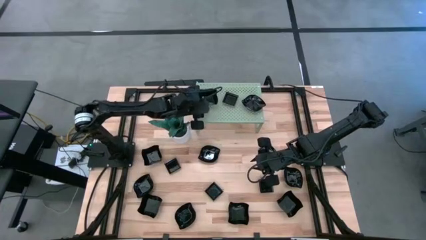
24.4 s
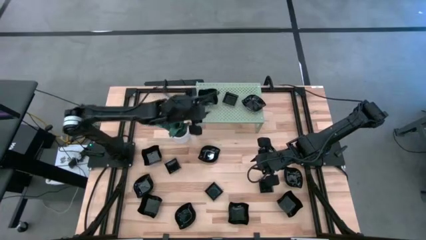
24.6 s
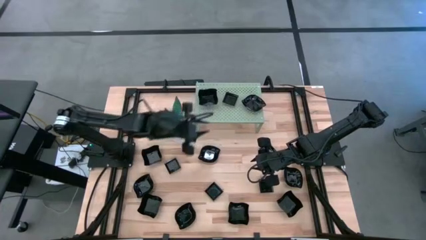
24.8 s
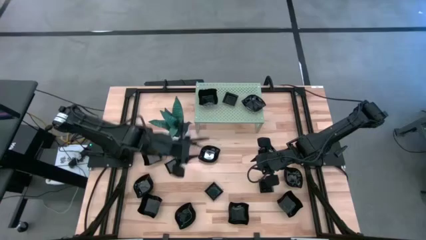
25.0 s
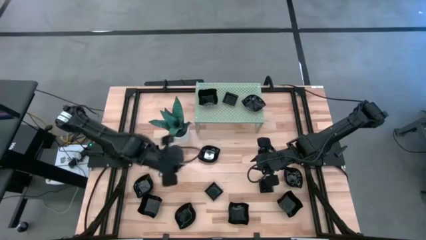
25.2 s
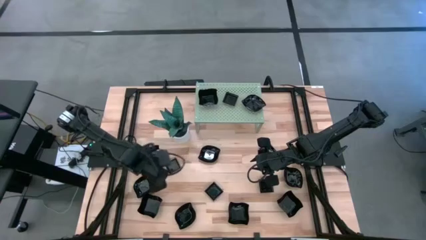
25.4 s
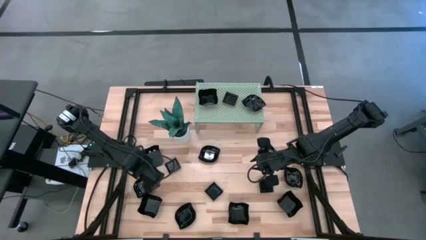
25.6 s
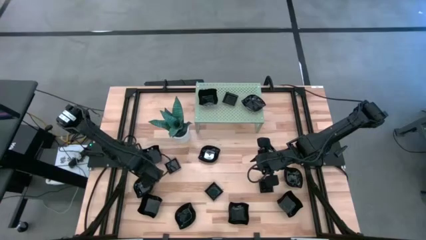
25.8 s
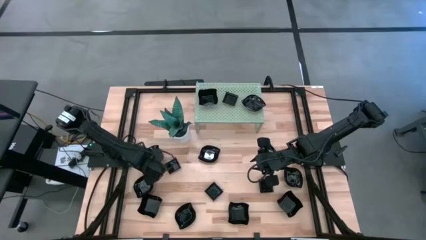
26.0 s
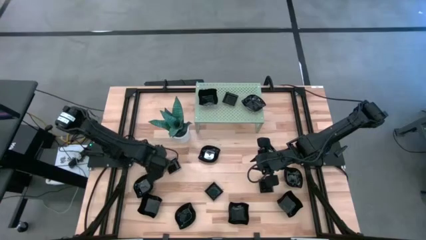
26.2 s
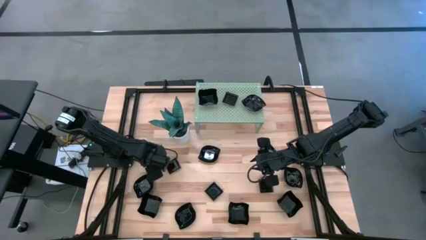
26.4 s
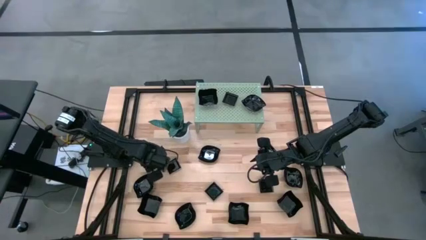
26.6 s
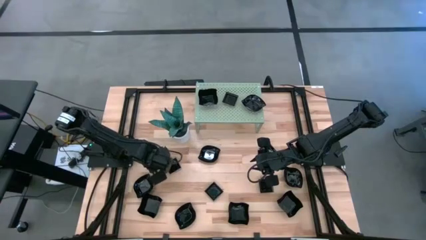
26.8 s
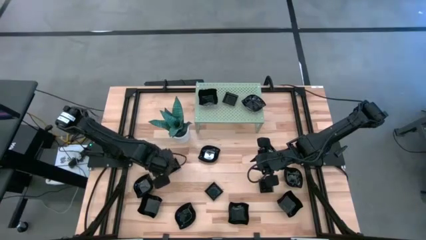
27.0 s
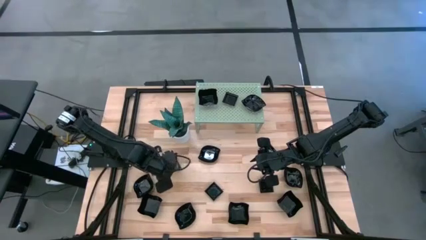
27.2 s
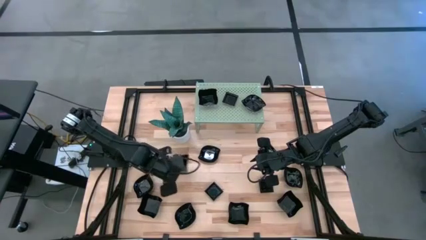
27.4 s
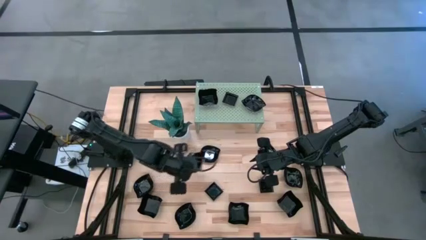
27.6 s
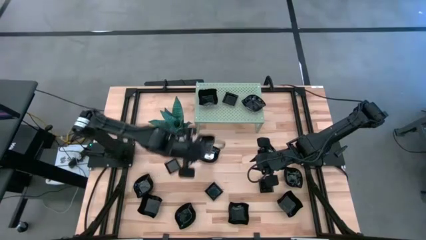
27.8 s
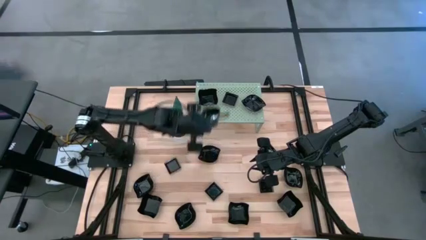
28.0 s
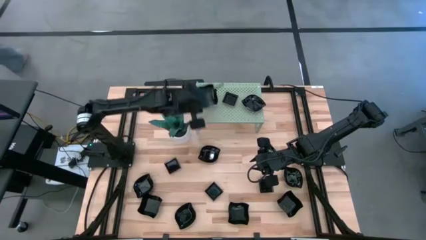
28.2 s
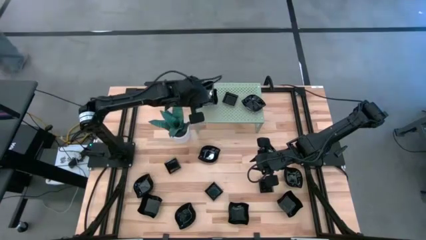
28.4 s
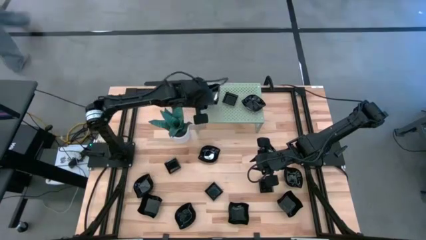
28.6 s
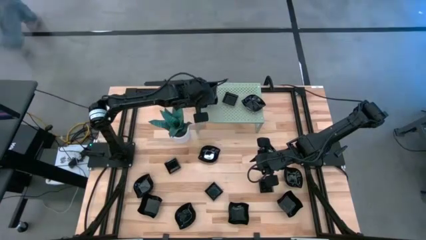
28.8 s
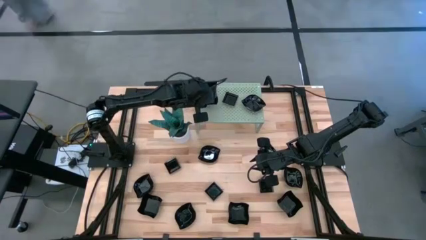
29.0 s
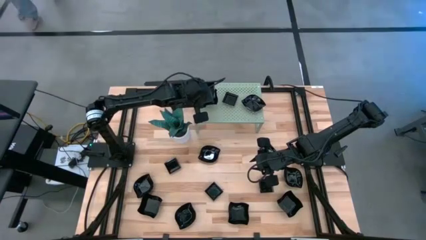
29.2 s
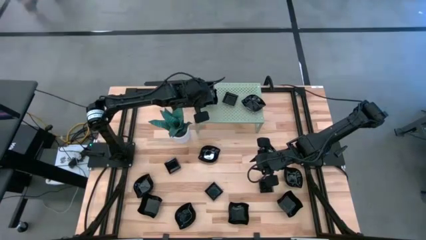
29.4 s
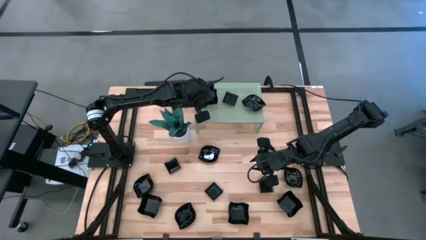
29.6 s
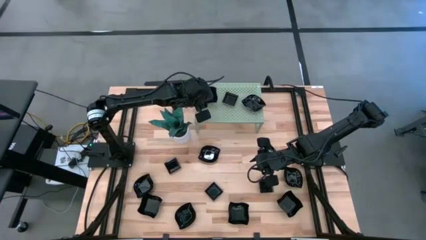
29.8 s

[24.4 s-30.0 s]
Task: Pick & Place Mini shaped plates
Stack the distorted square plate on top of the other distorted square plate on the shelf

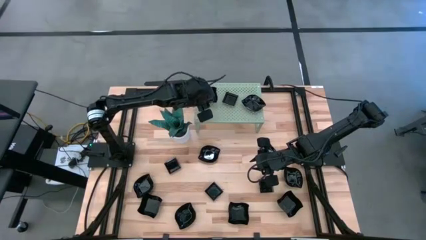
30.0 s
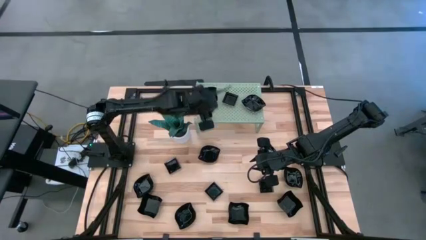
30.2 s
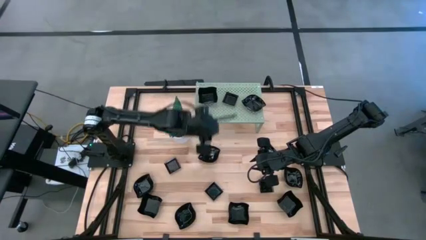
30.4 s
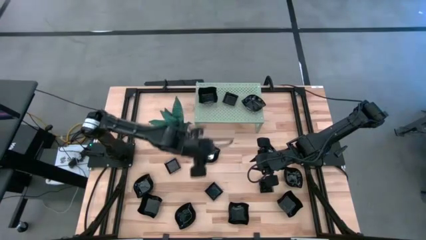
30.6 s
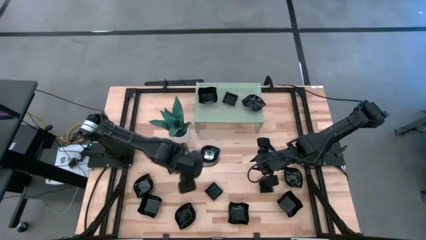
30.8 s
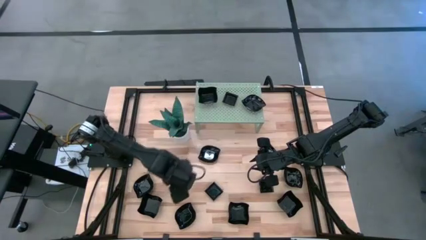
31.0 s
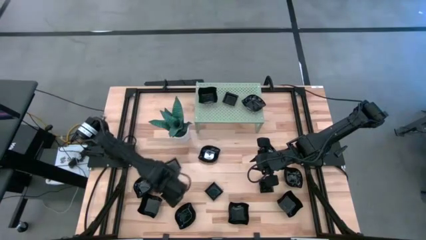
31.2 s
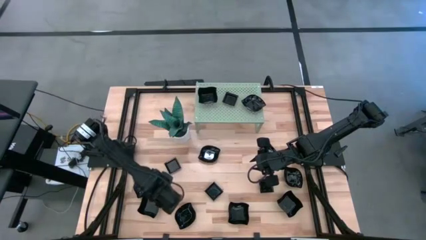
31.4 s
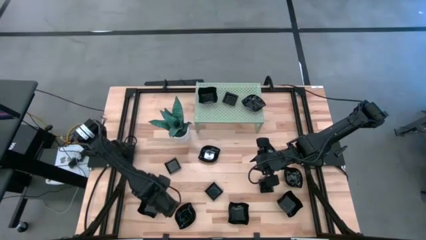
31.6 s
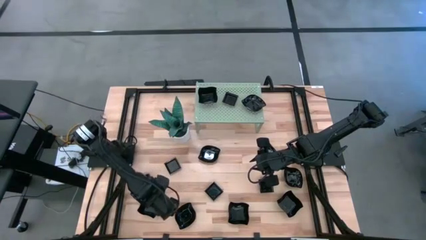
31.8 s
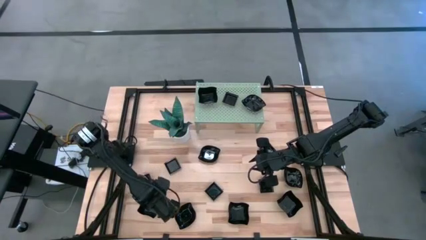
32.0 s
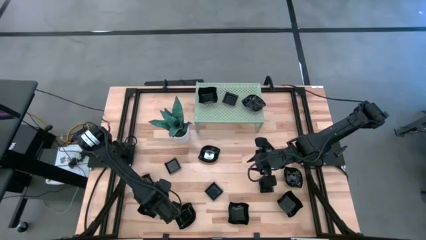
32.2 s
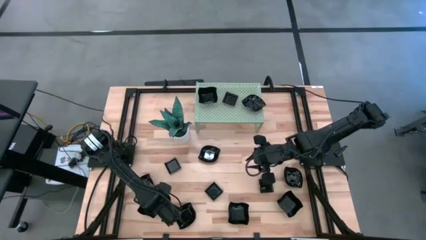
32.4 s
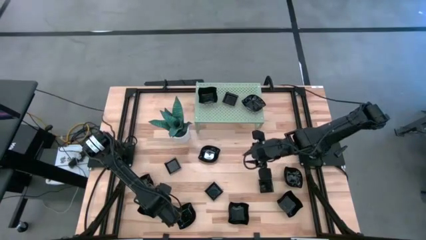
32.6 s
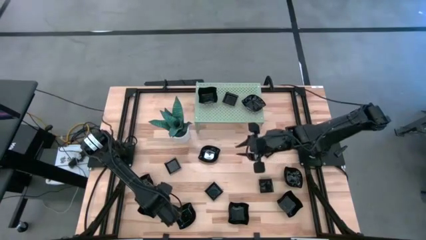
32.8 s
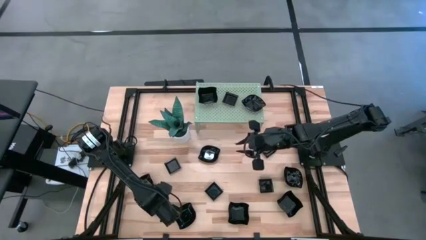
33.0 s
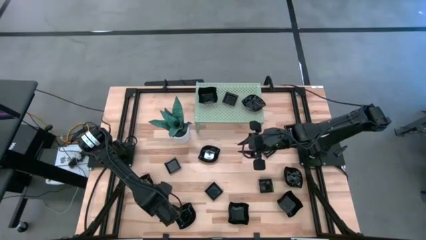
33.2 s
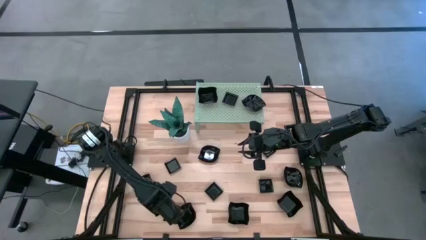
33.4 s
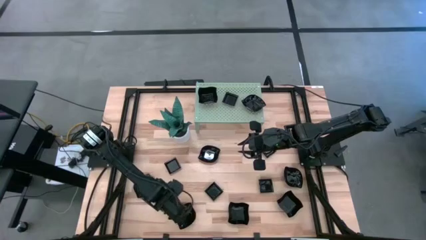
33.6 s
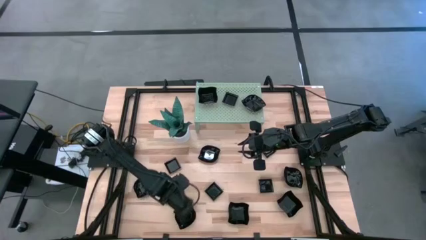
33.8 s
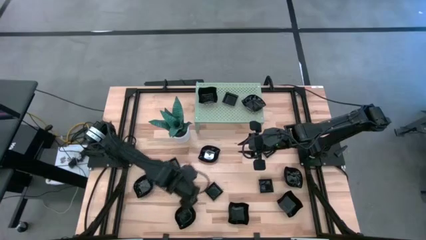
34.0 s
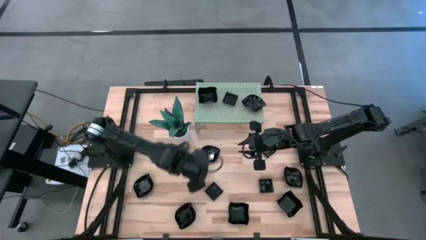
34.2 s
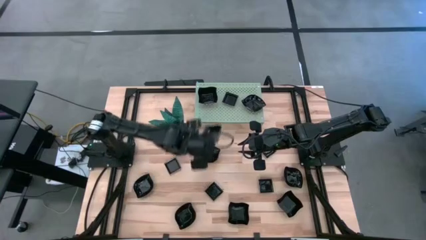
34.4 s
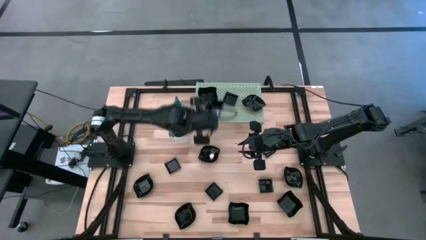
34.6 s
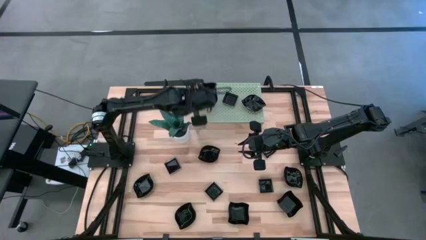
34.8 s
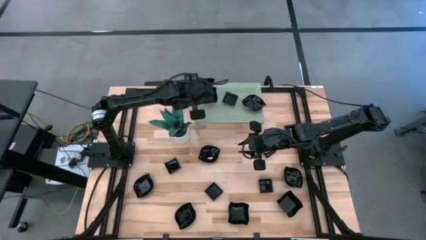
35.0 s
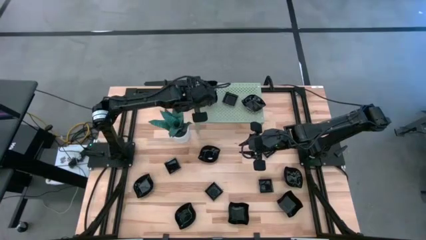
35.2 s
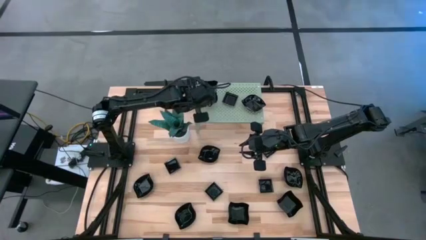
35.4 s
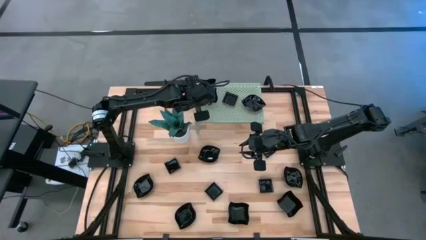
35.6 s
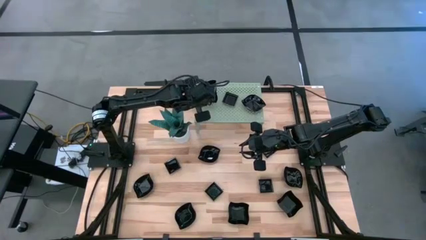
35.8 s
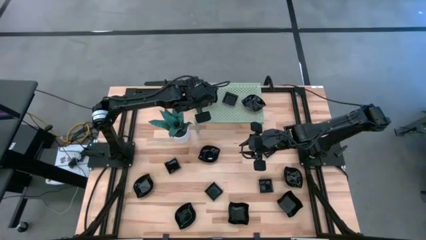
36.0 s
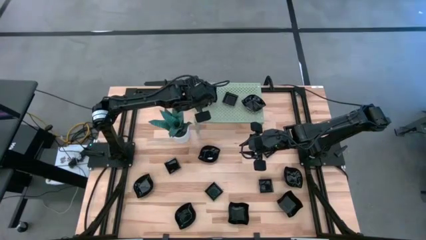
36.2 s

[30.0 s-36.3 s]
Stack the distorted square plate on top of the other distorted square plate on the shelf

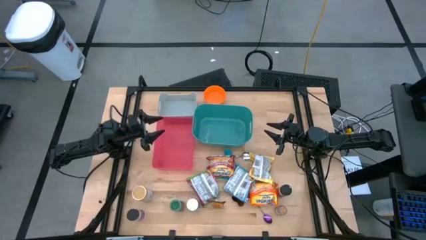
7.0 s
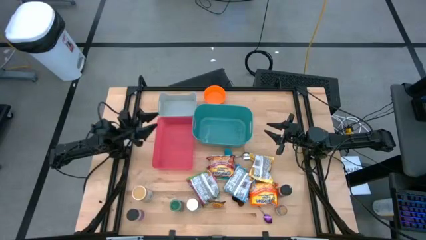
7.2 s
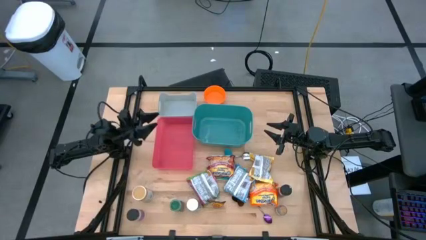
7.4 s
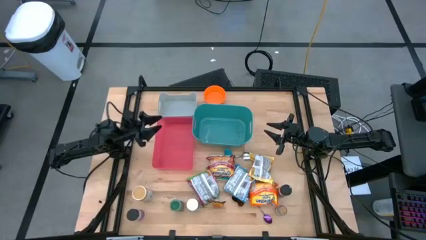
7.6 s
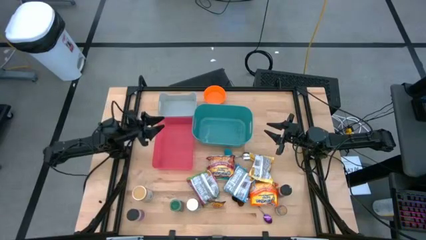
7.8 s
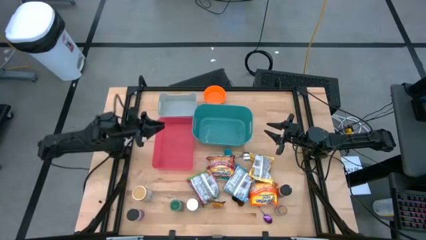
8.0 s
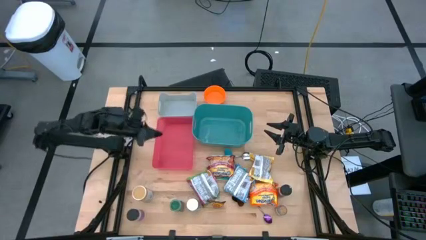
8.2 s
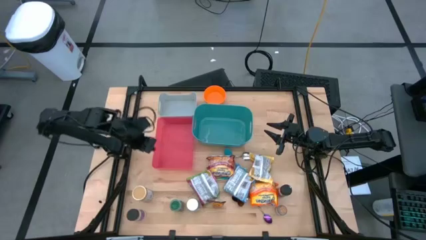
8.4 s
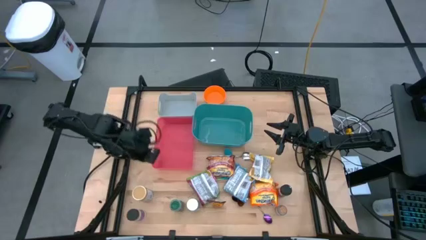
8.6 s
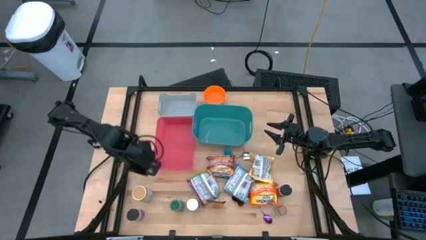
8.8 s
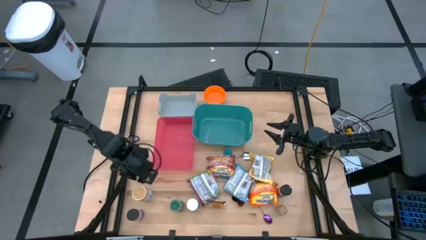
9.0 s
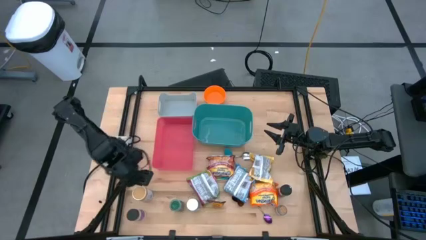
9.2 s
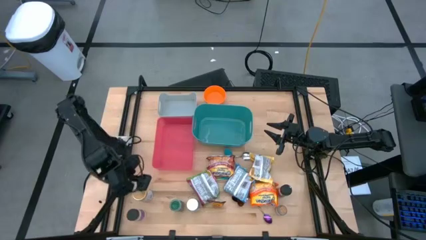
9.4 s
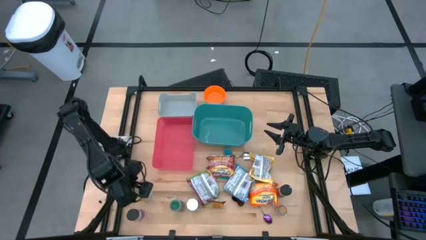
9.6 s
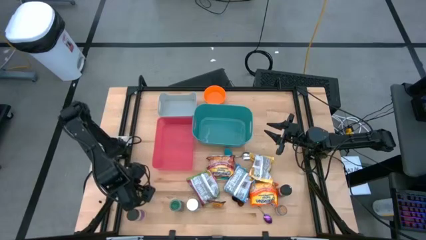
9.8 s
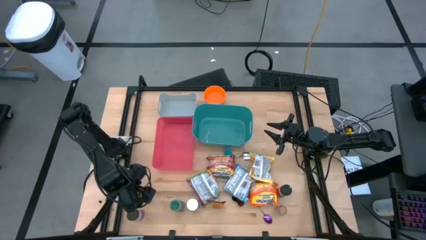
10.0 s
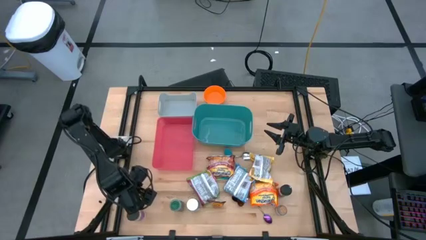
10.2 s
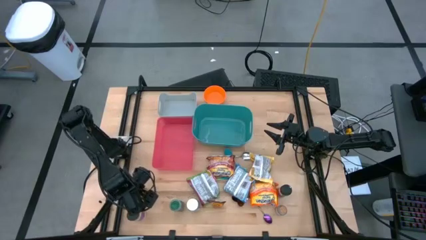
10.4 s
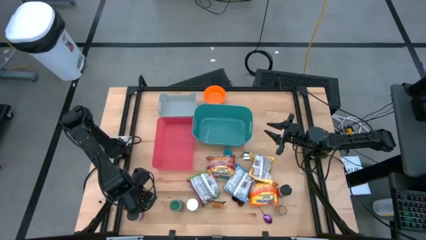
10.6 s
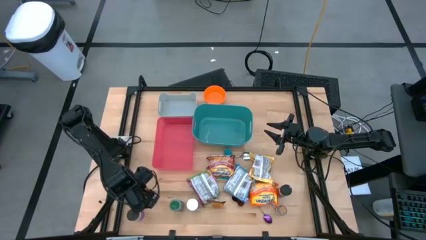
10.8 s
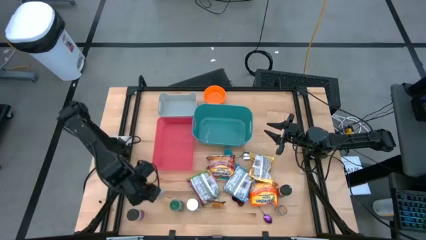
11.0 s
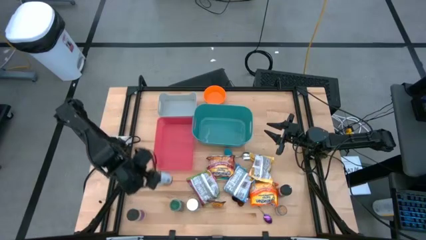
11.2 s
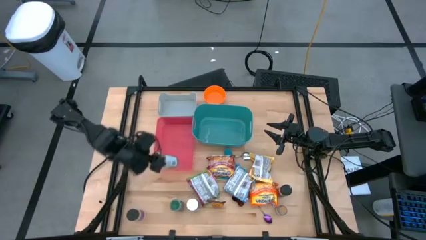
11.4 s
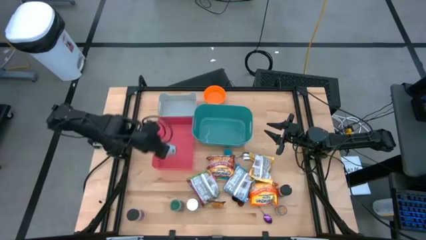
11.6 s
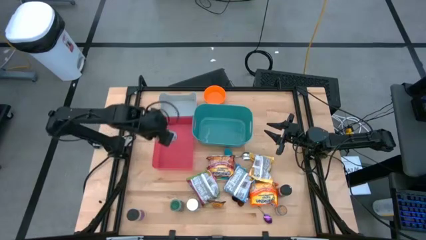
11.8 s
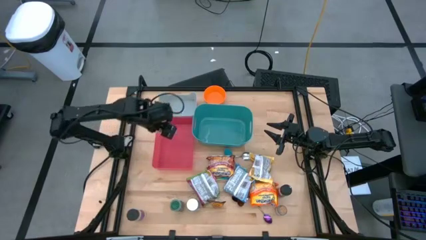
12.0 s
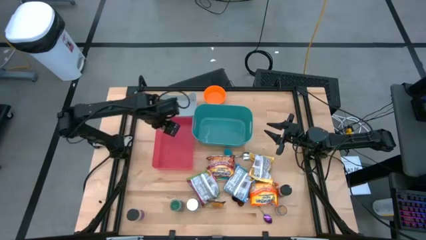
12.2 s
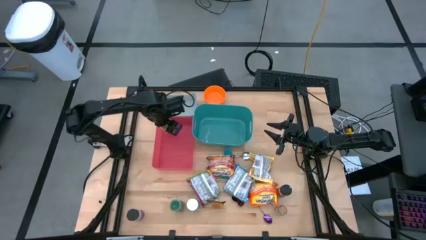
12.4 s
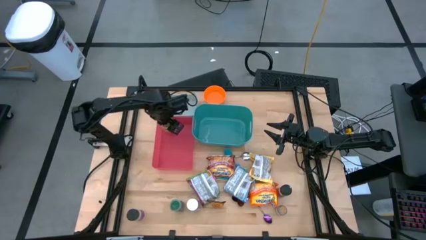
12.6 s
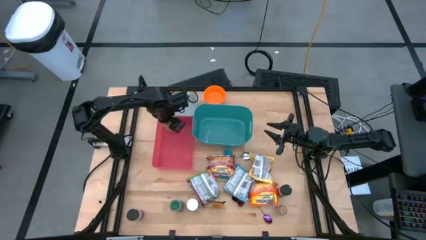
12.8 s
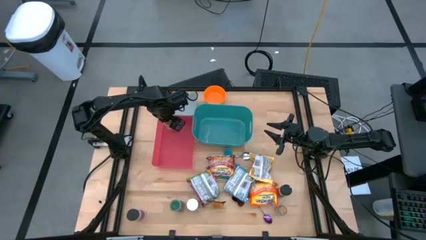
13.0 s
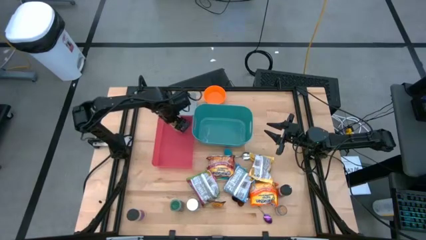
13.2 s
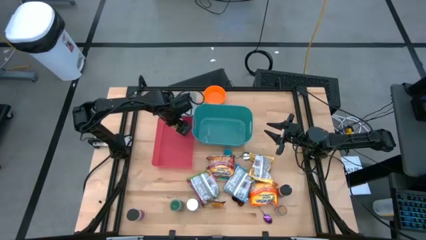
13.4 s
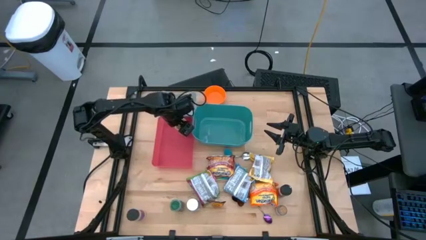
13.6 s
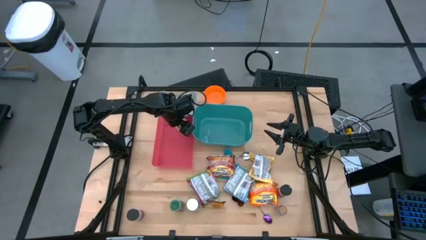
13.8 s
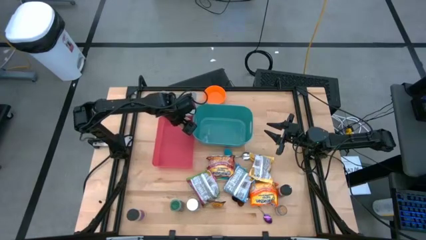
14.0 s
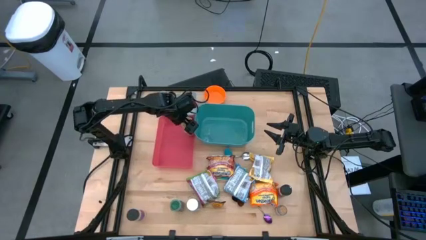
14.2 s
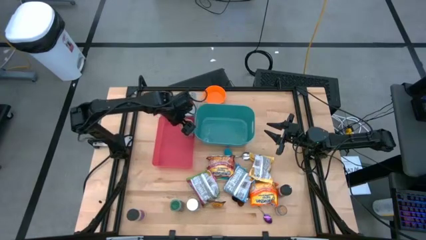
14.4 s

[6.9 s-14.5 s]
Task: Pick & Place Food Item
Put the golden spice bottle into the red bin
